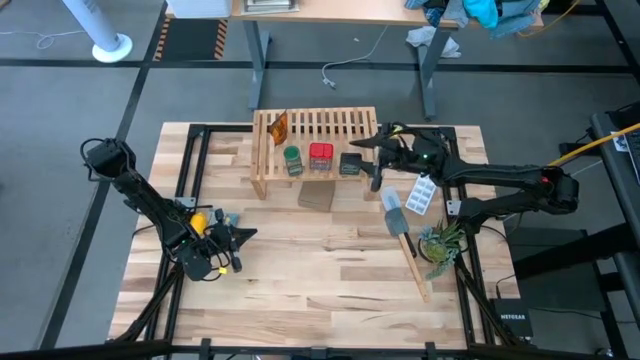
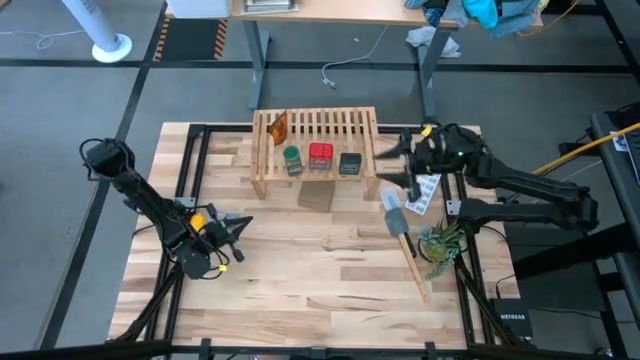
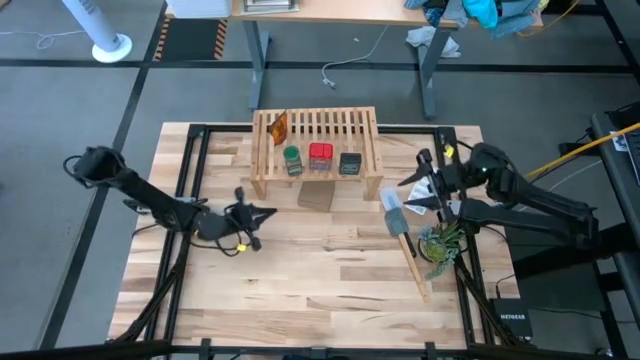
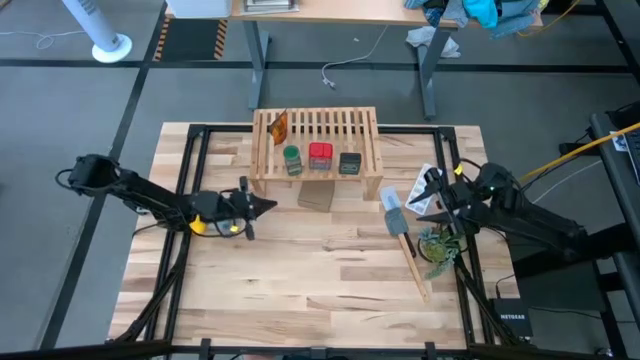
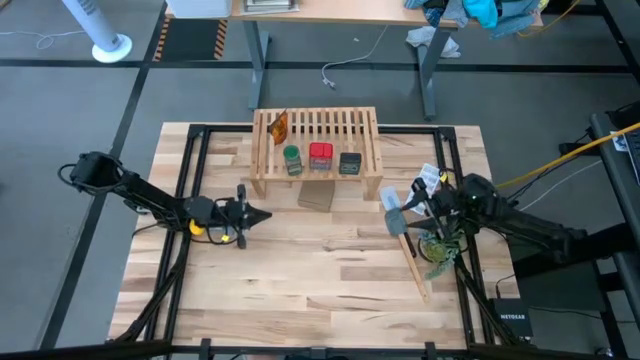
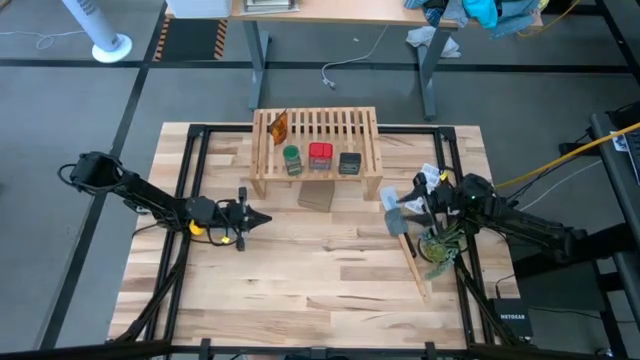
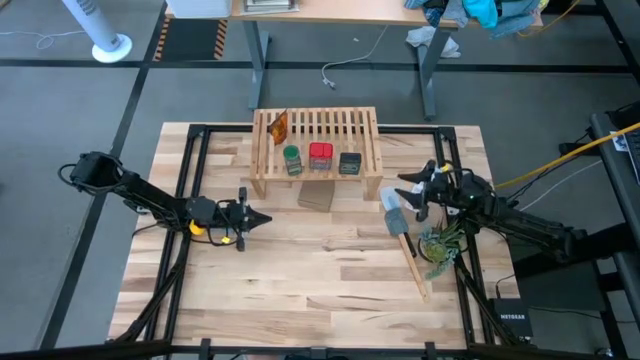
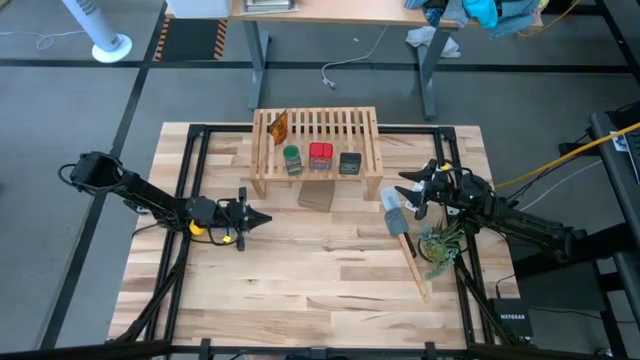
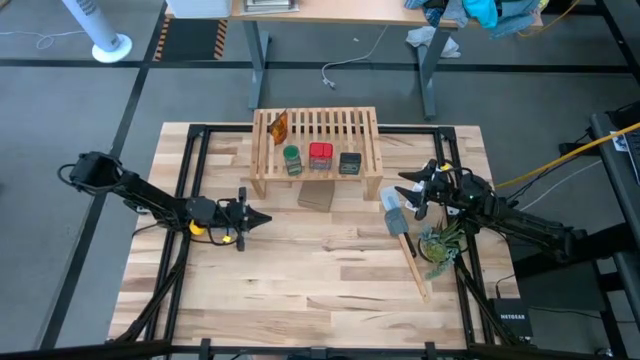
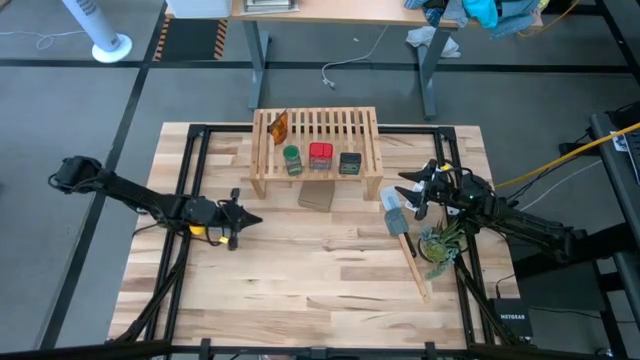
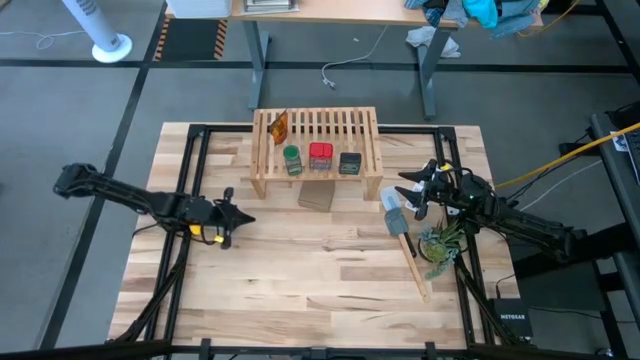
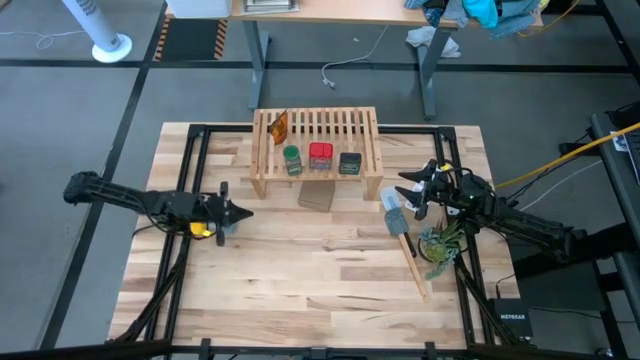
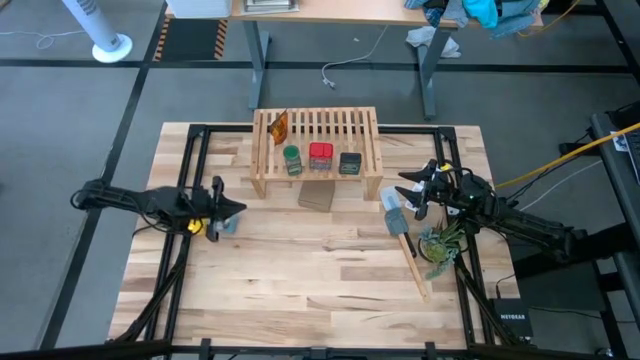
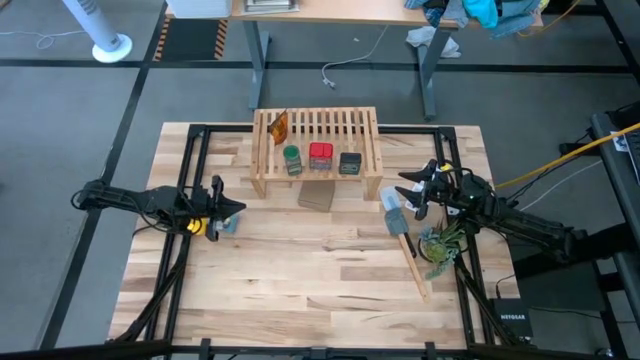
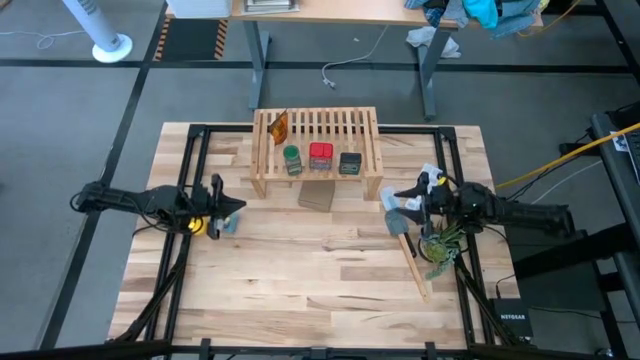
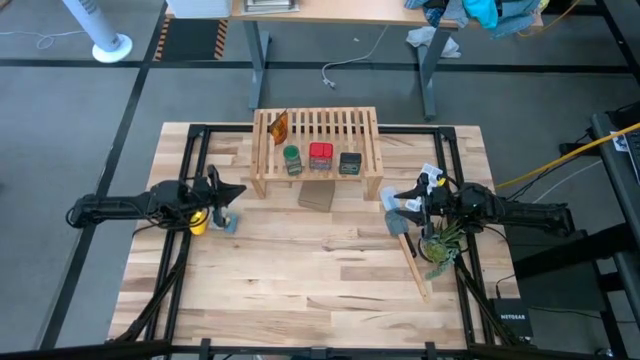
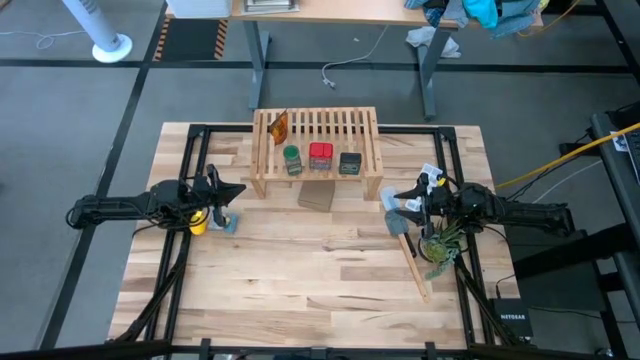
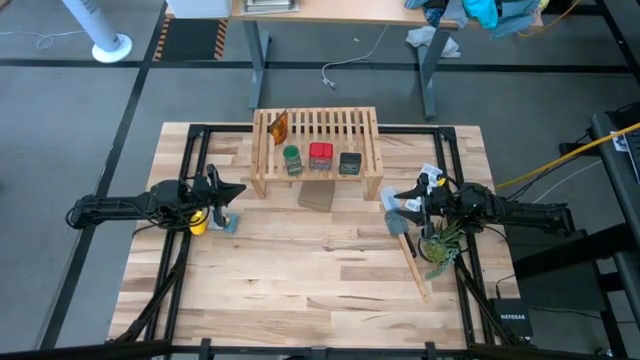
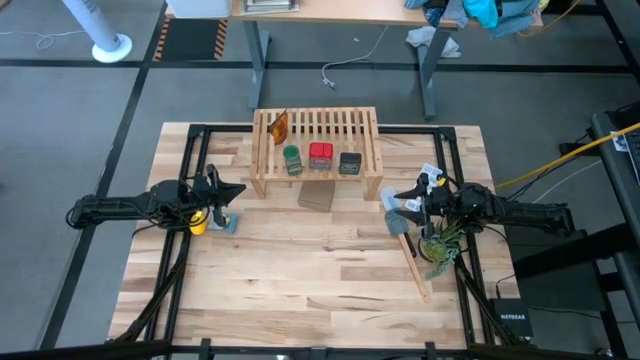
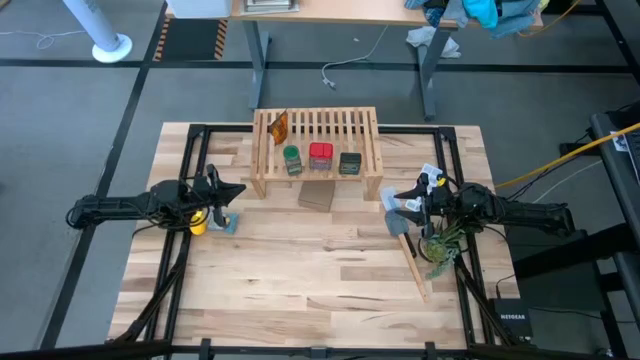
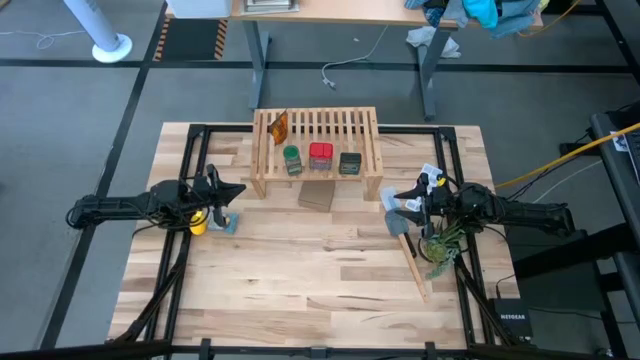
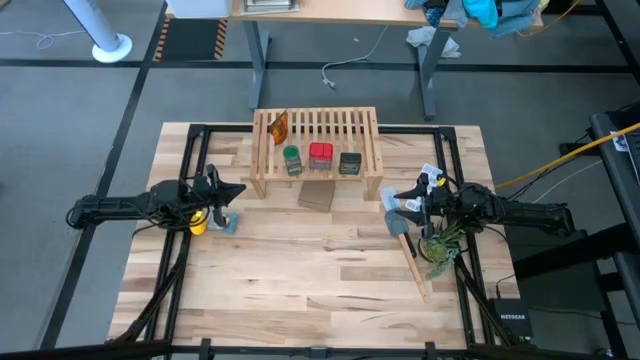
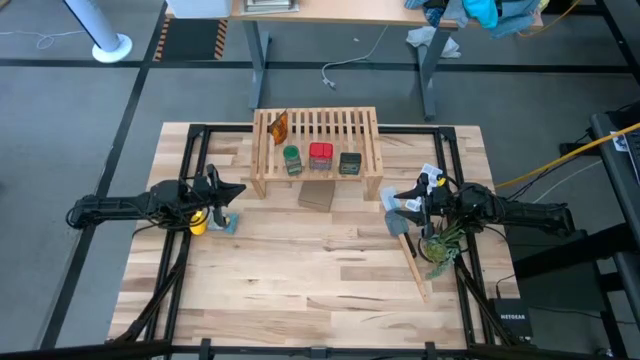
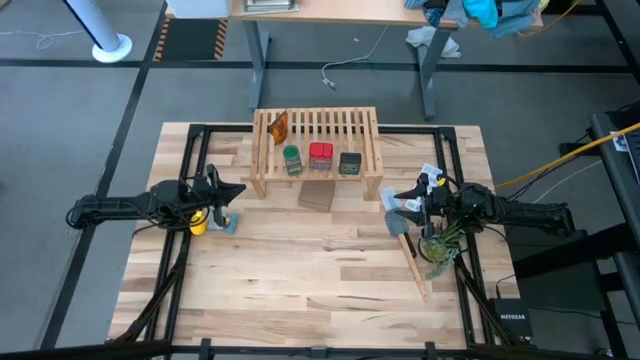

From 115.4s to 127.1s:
Task: Shelf spices
Return to Home Position
